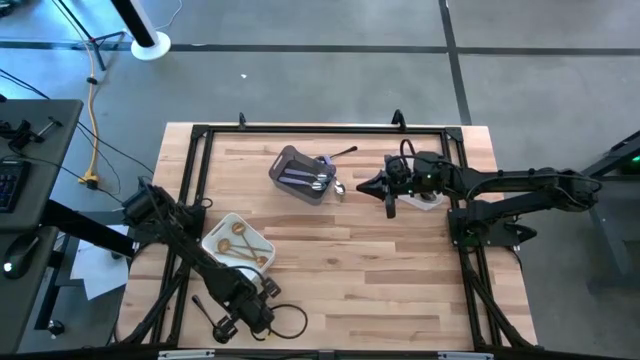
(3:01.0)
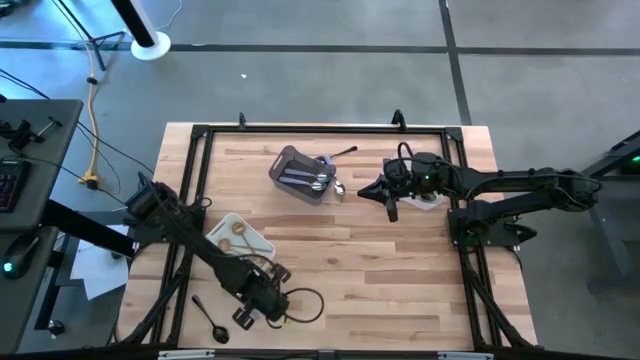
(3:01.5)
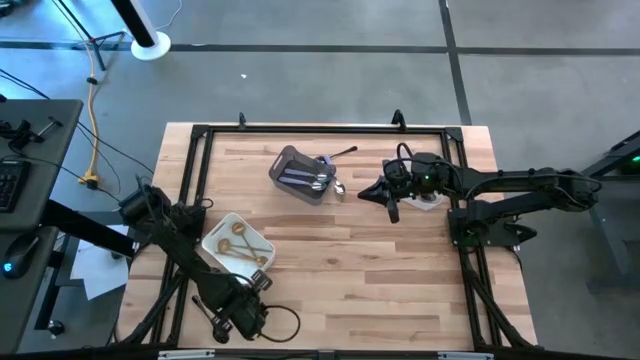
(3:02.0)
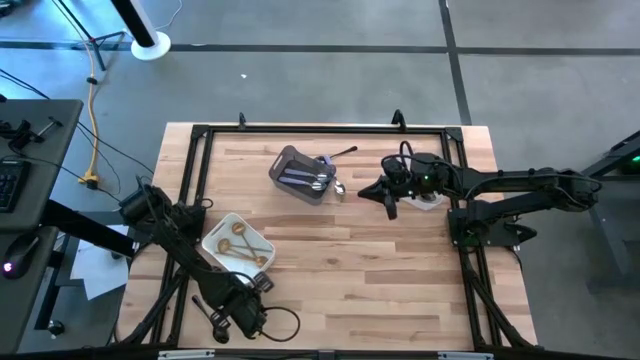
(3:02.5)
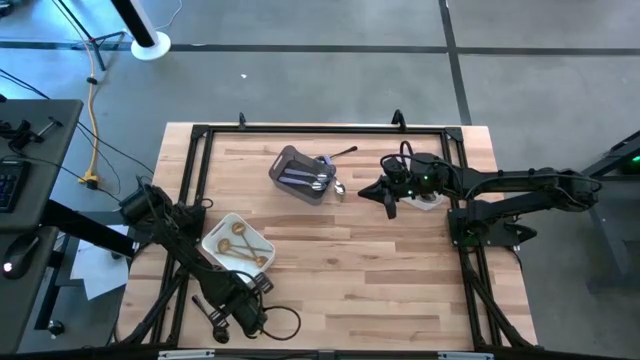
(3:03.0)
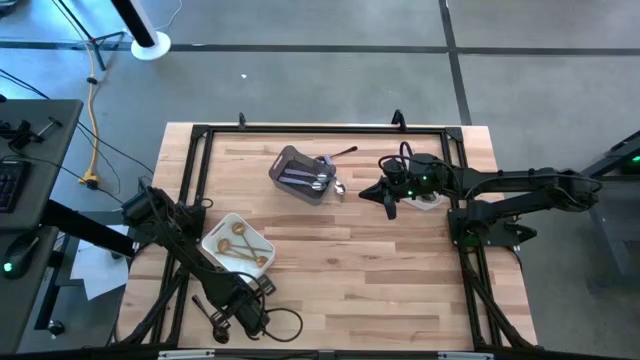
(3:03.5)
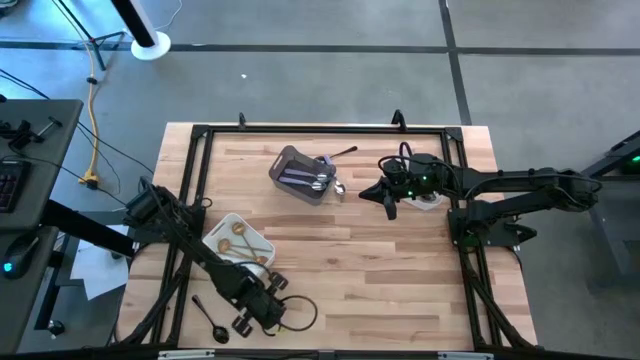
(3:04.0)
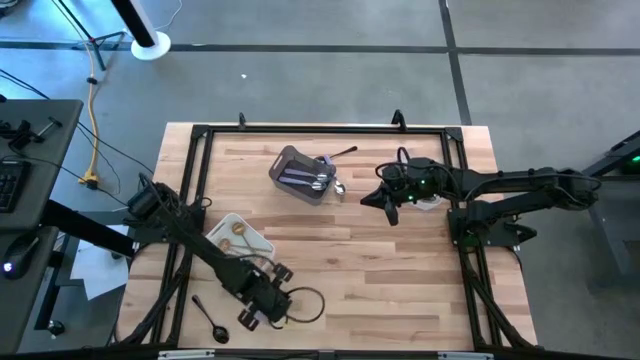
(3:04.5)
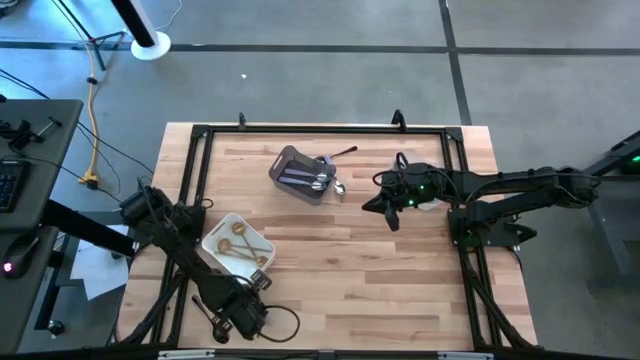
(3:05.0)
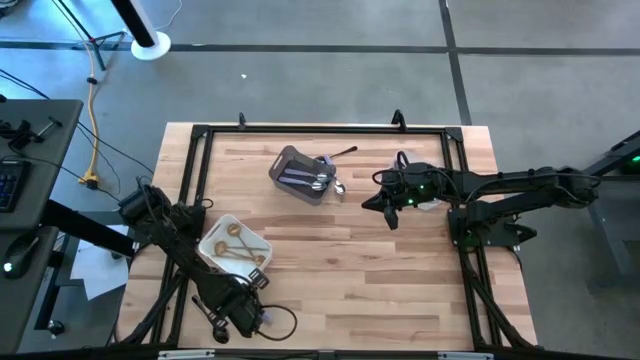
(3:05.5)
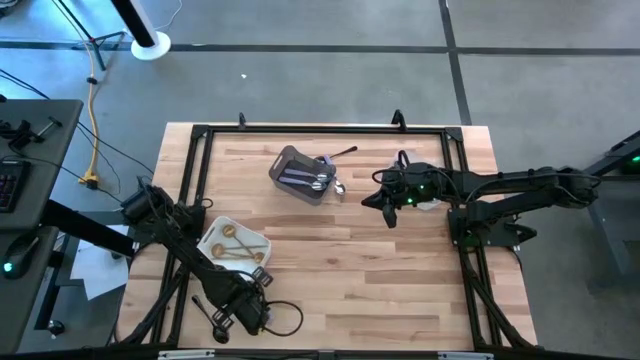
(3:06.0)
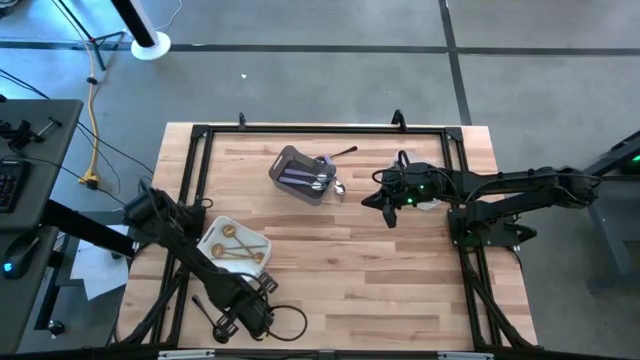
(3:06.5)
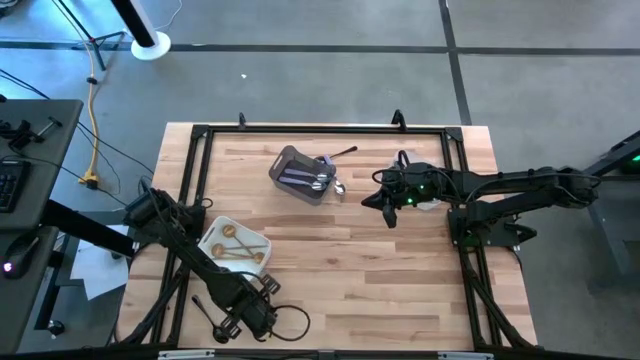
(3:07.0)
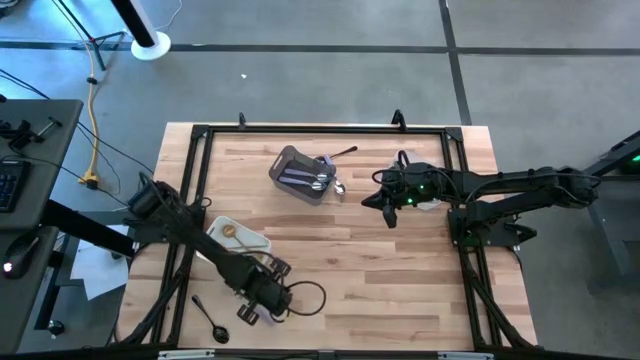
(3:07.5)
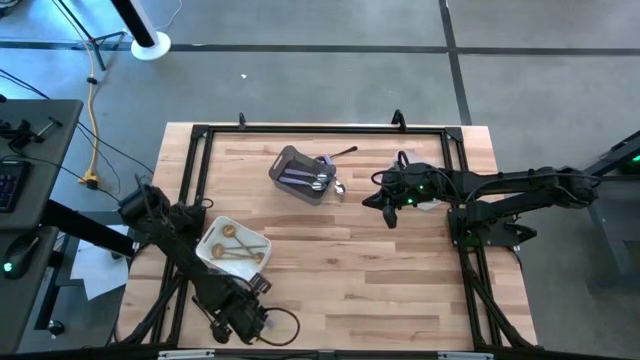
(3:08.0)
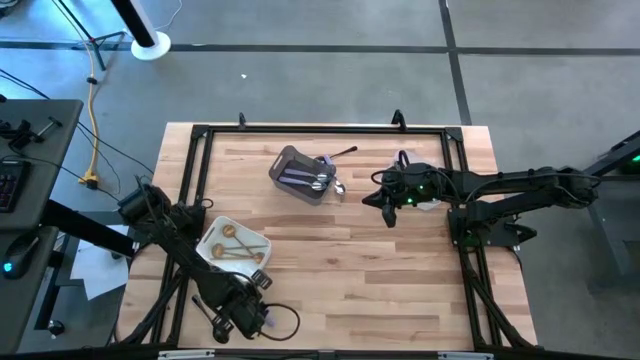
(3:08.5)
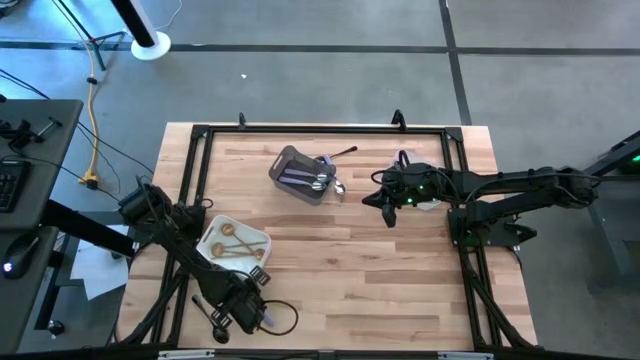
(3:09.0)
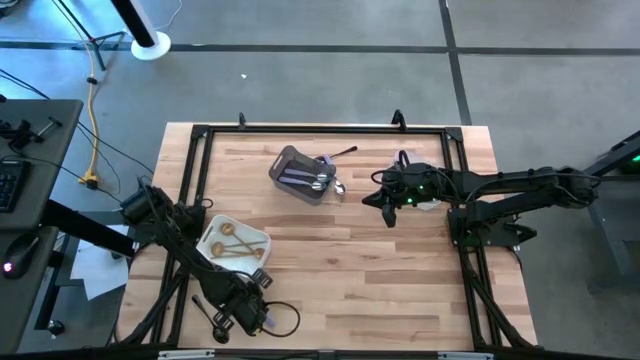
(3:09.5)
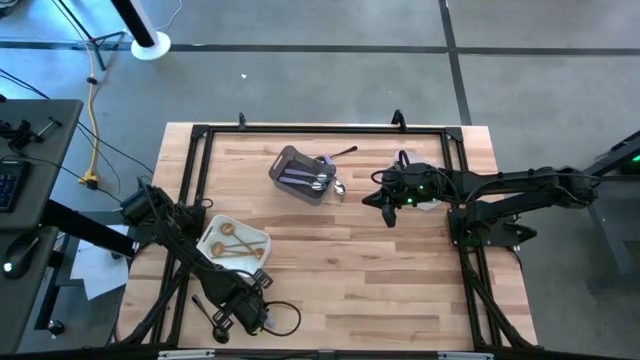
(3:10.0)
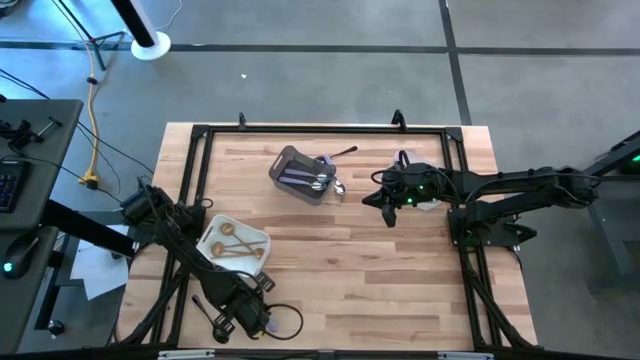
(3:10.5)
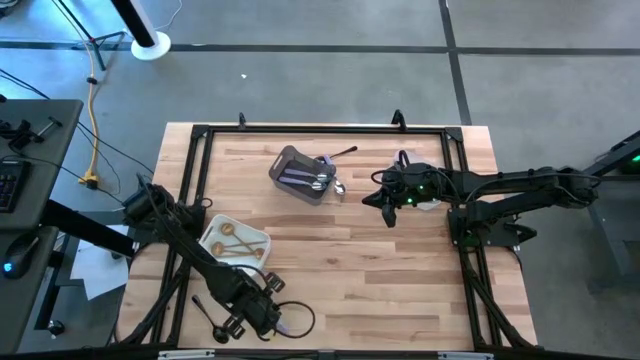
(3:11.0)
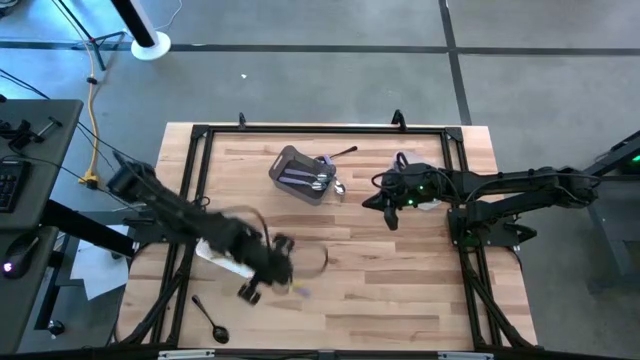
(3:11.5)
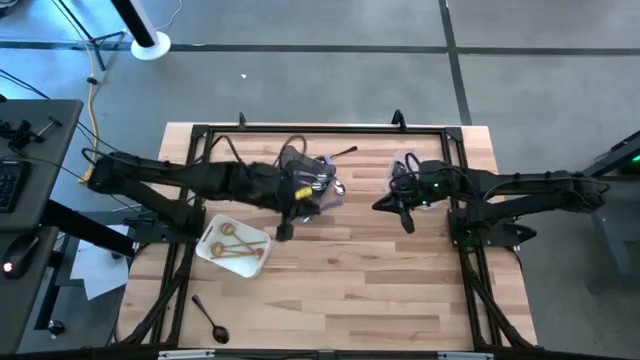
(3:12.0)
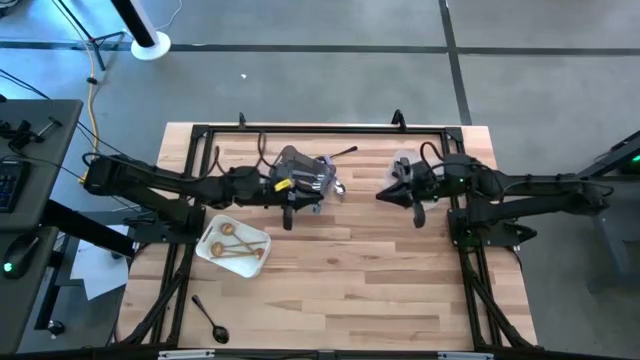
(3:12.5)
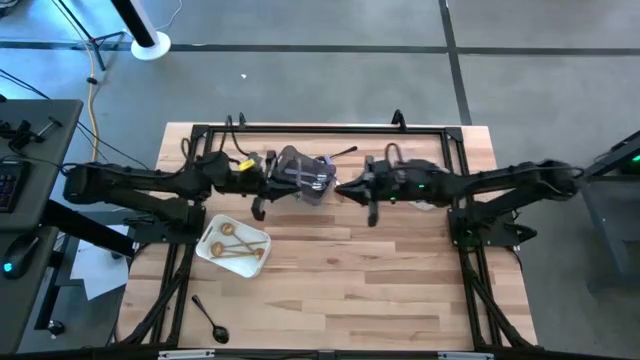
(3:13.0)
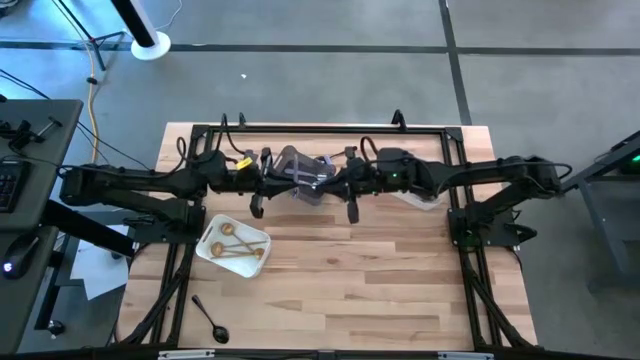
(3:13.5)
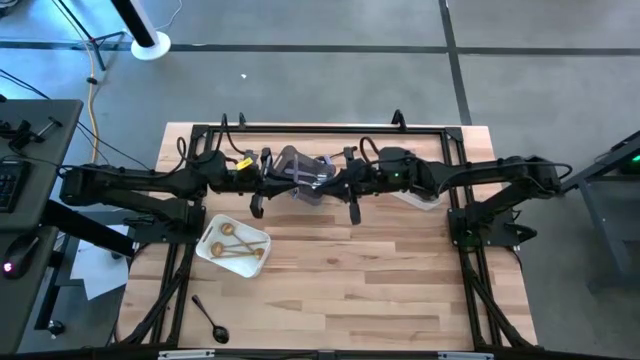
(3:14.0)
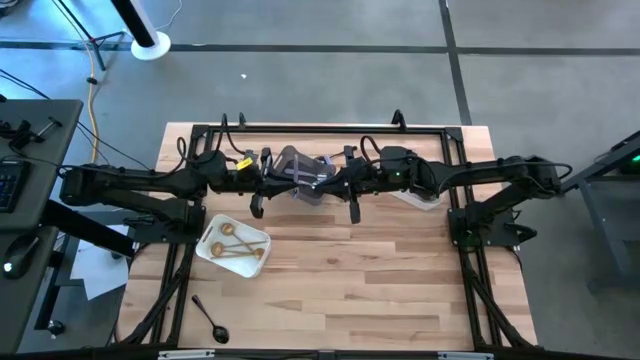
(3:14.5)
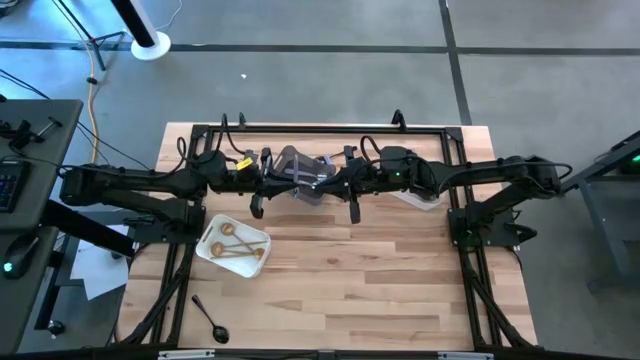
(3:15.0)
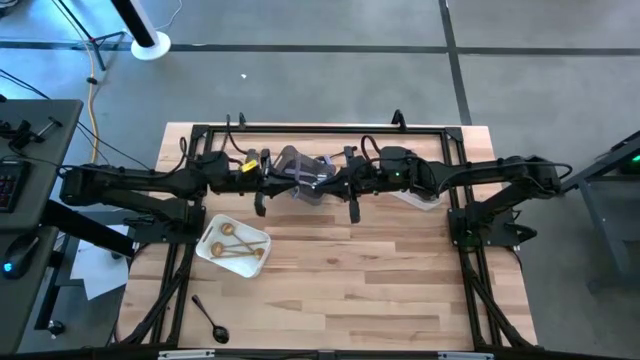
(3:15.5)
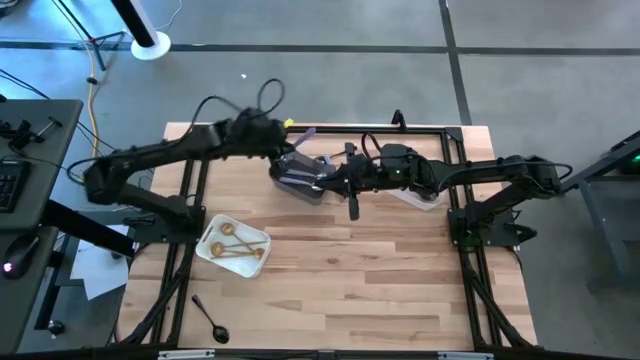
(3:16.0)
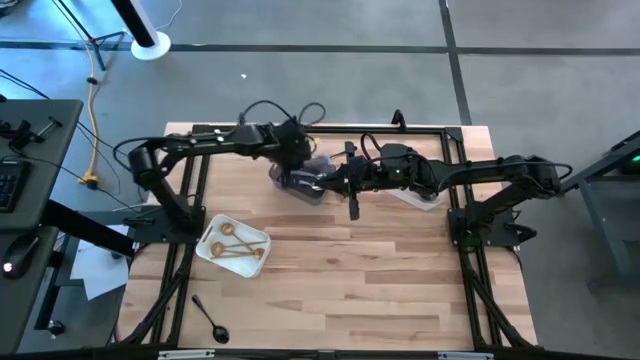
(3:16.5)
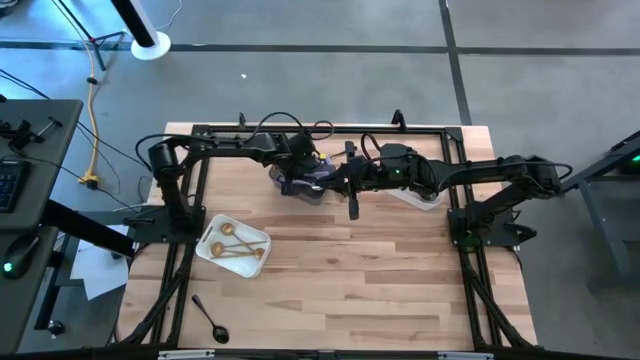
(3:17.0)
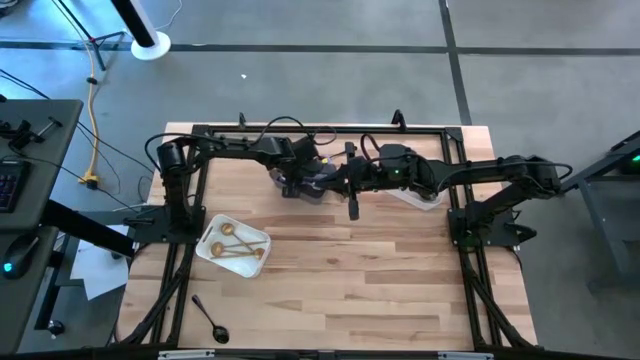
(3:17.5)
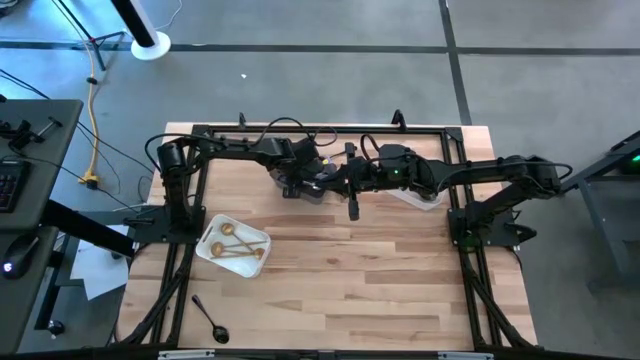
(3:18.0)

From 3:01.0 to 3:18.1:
Task: Sort silverware by color (type)
Put the bottom purple spoon into the black bin

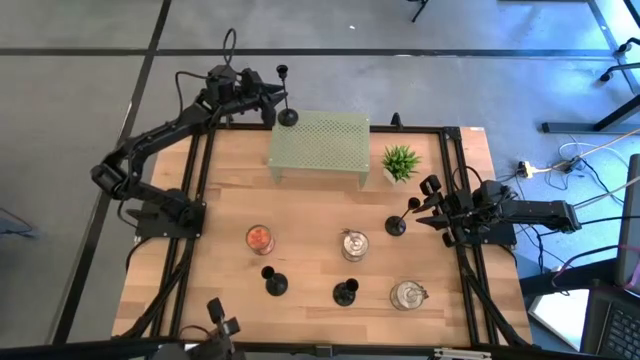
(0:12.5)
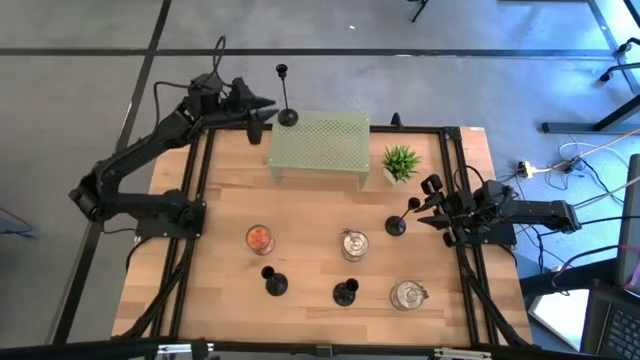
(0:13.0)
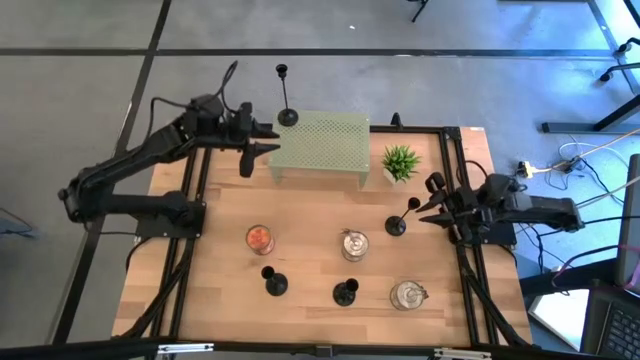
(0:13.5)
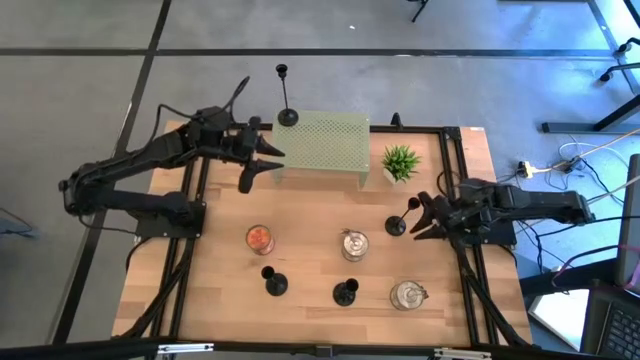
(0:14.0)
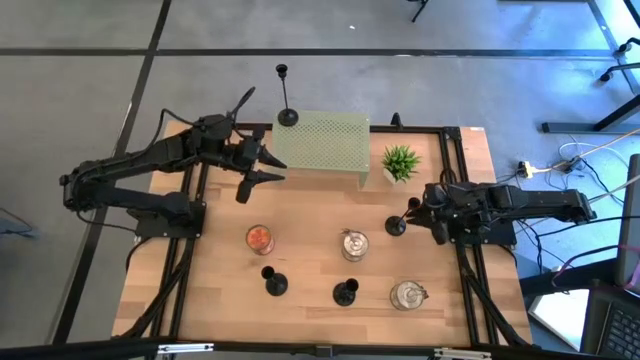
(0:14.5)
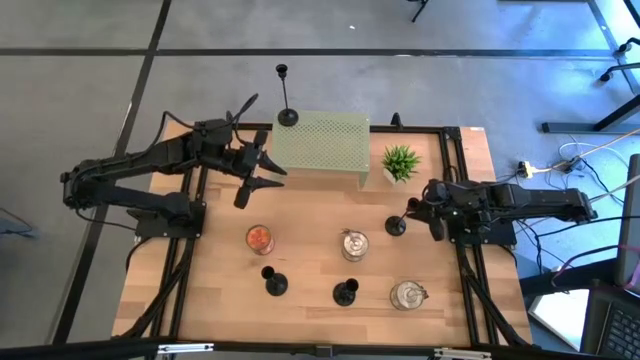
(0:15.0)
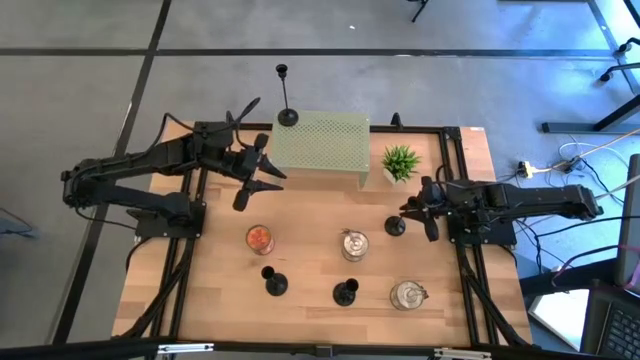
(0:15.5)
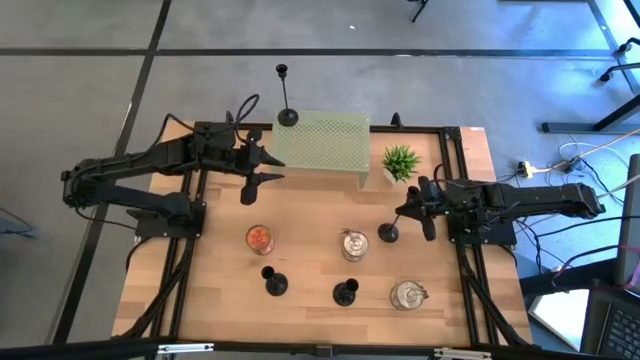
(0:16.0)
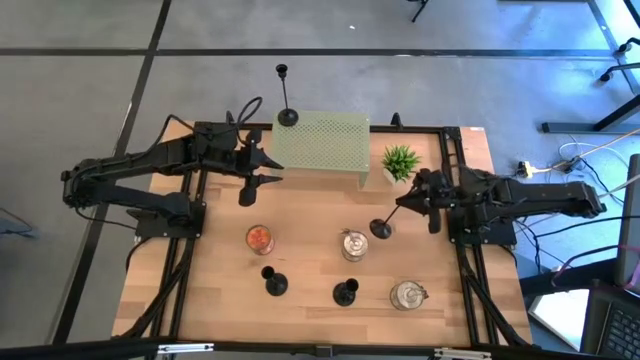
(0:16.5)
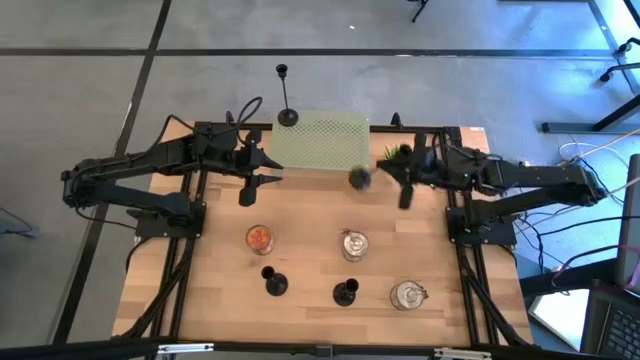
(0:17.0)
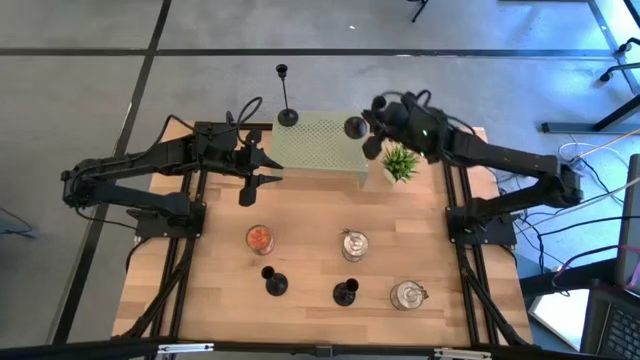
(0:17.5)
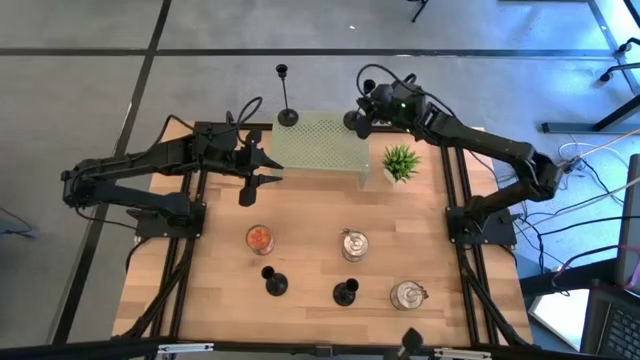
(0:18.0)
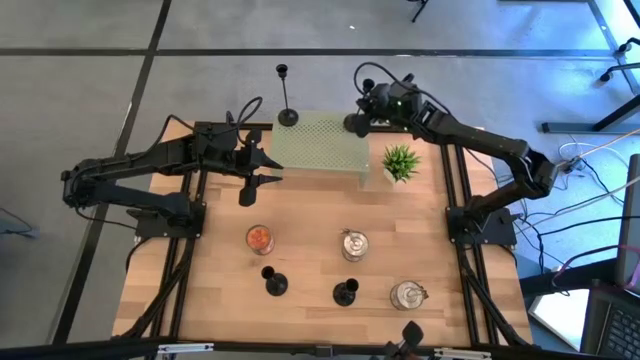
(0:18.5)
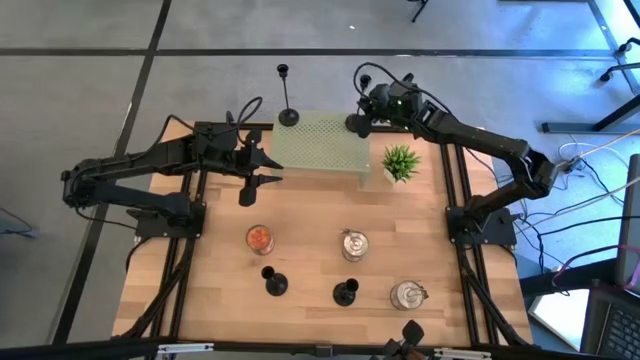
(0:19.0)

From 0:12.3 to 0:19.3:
Task: Pick & Place candle stick holders
Put the top right candle holder on the shelf aligned with the other candle holder
